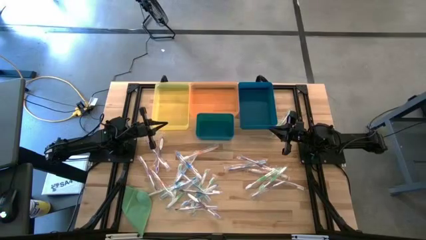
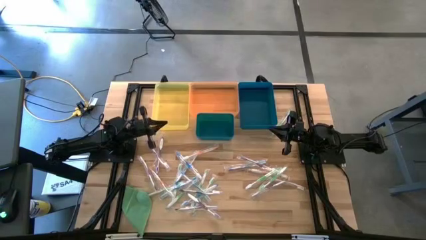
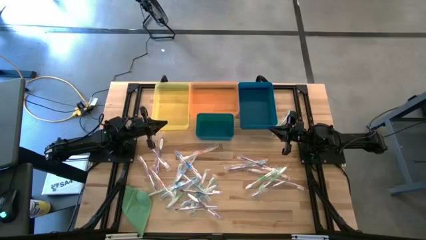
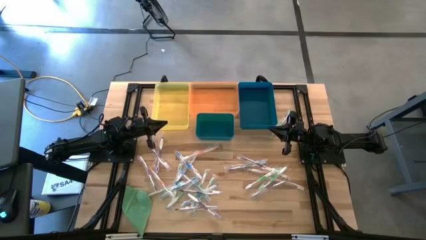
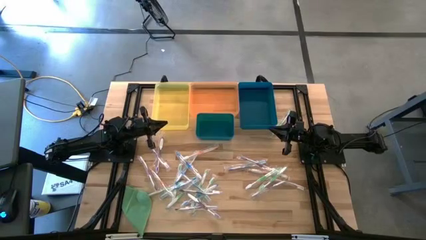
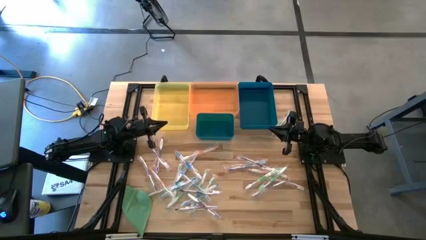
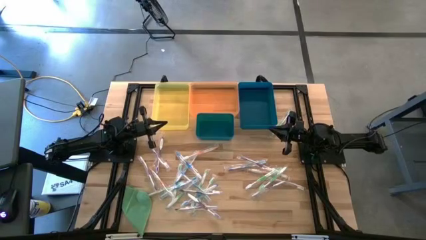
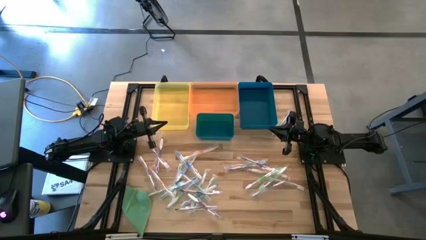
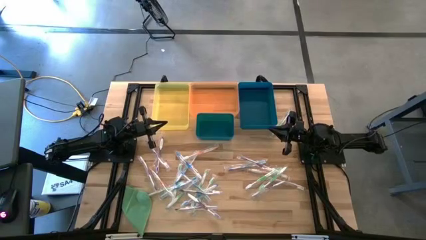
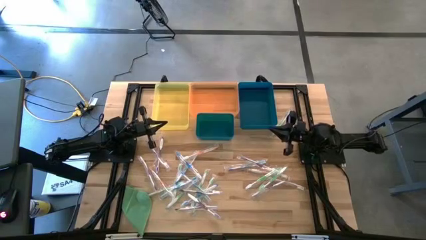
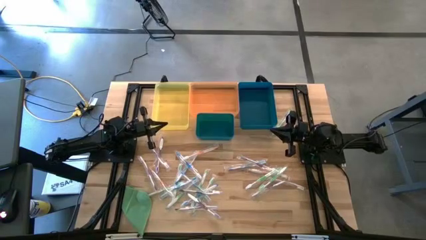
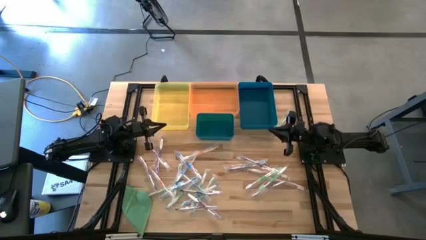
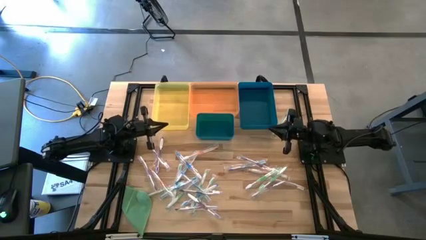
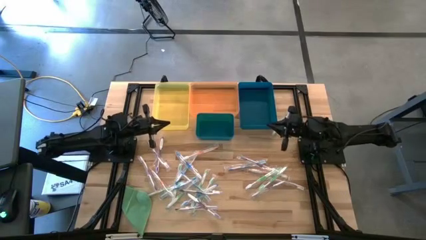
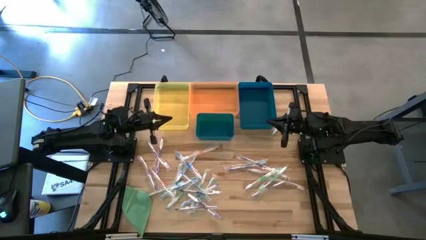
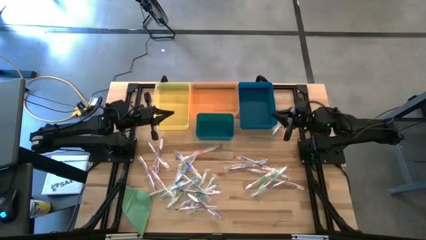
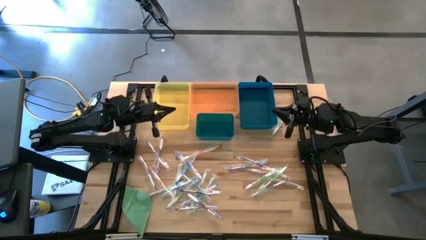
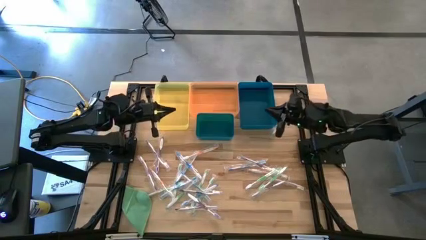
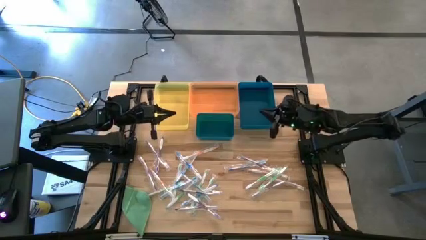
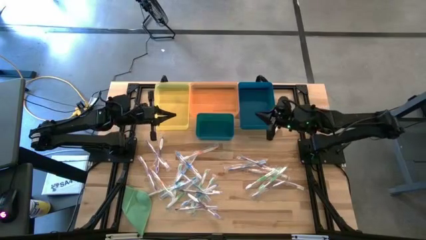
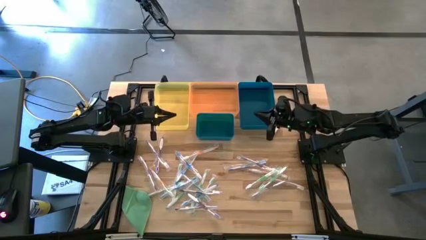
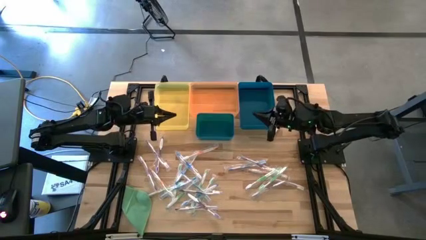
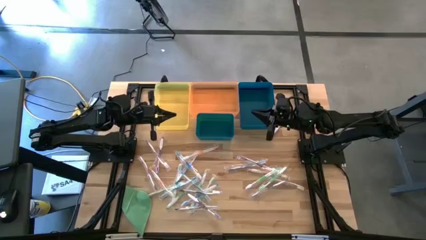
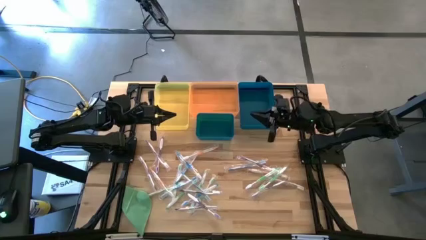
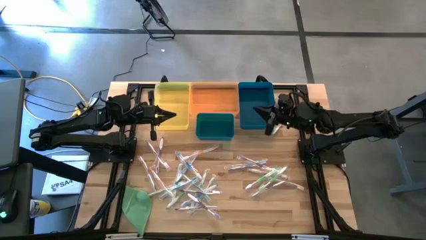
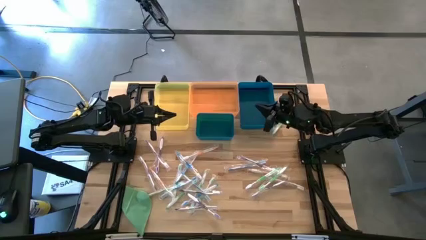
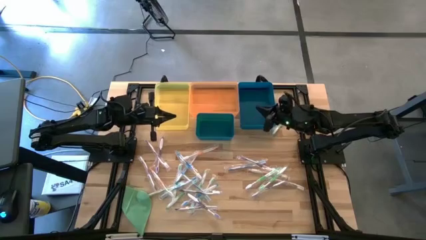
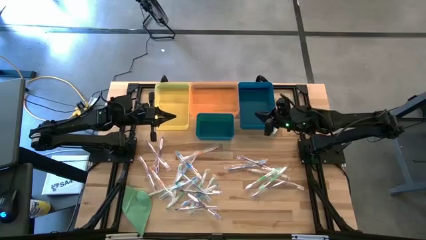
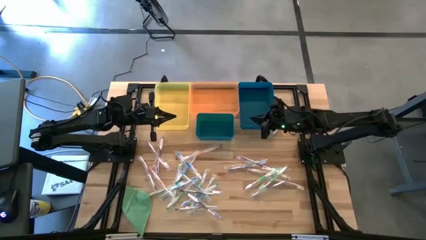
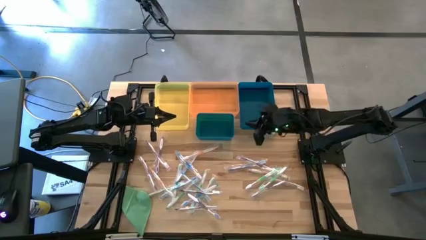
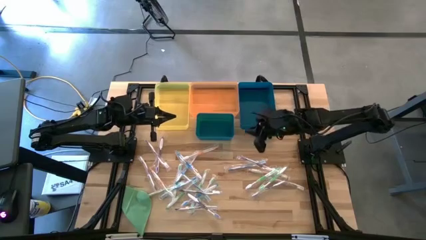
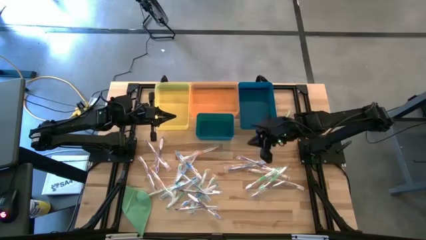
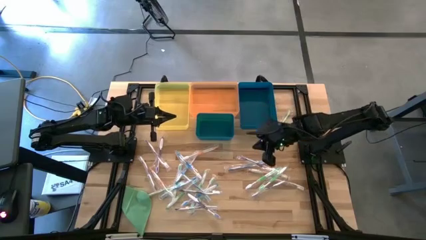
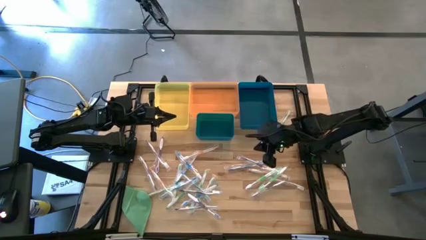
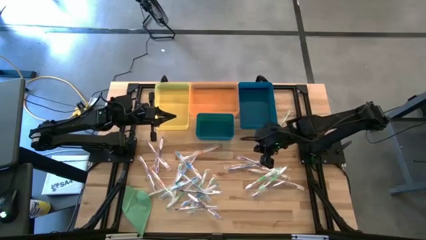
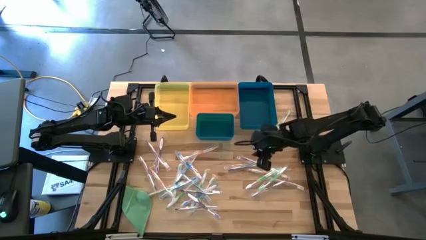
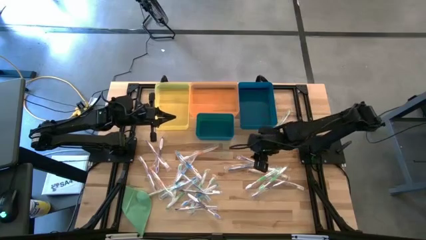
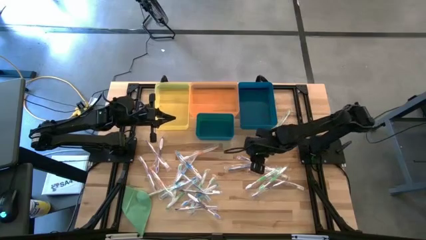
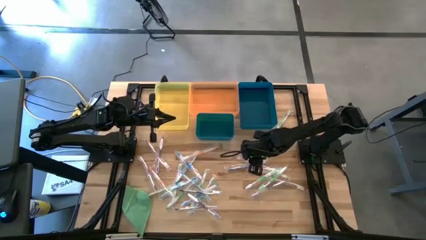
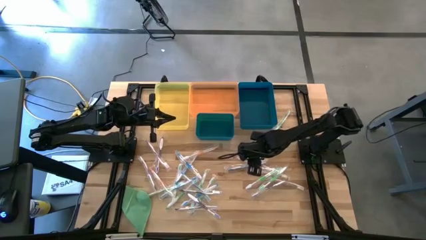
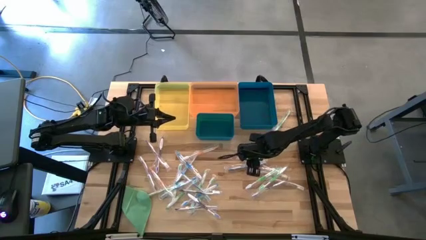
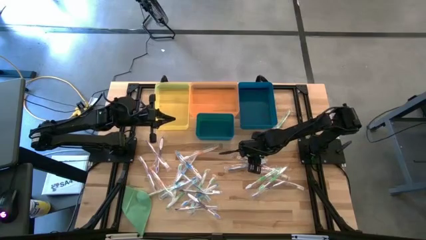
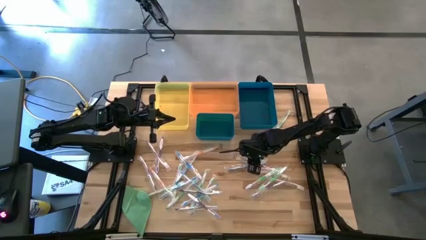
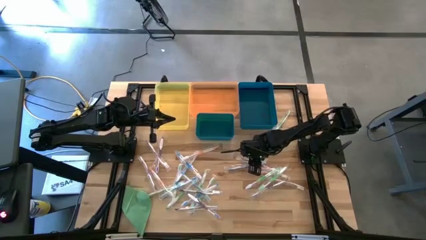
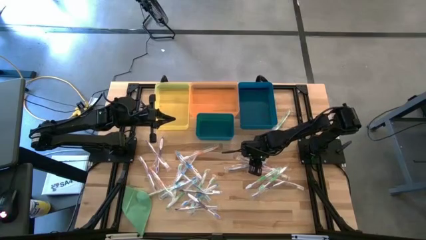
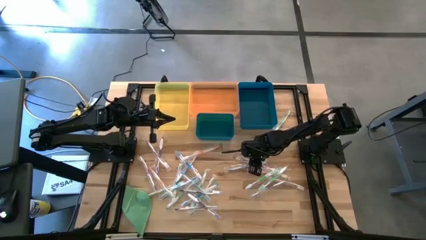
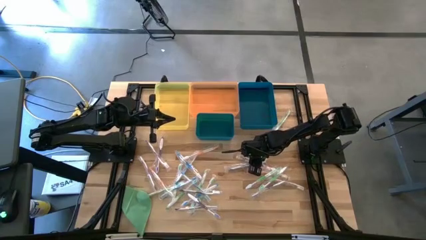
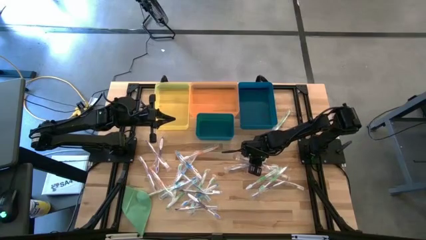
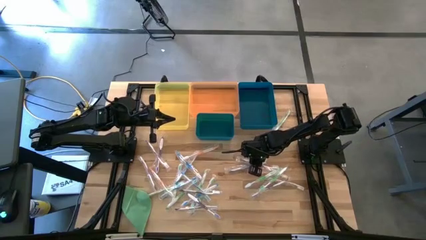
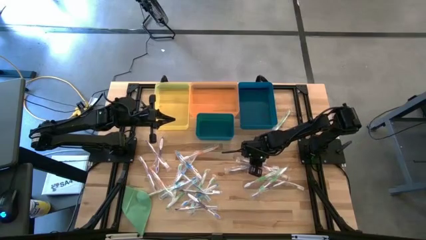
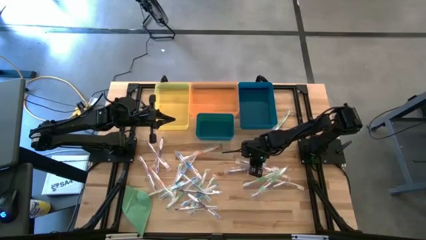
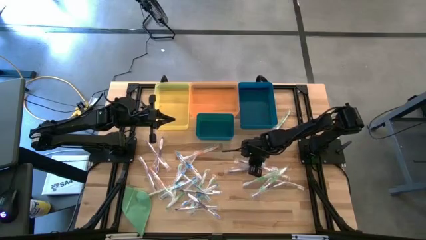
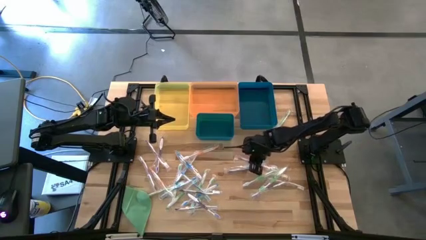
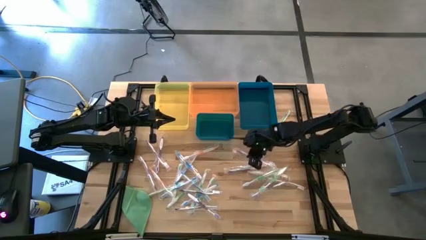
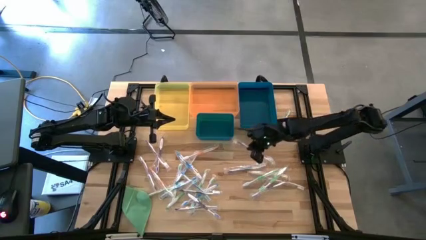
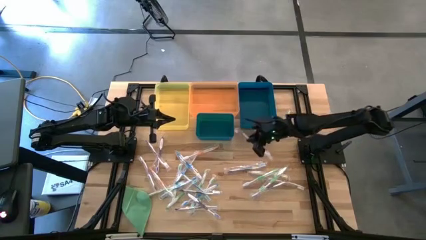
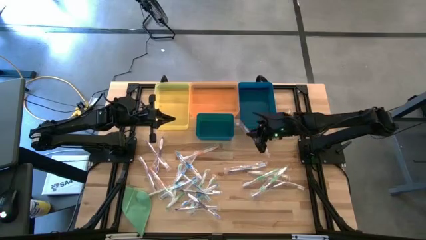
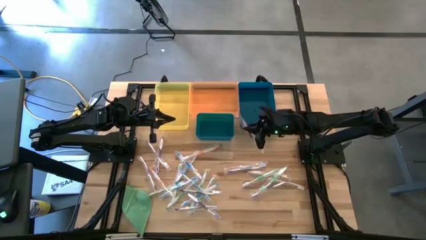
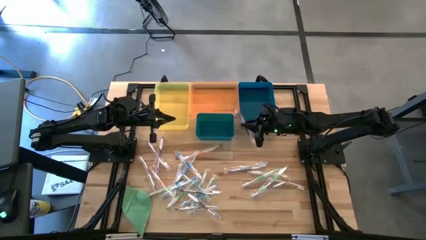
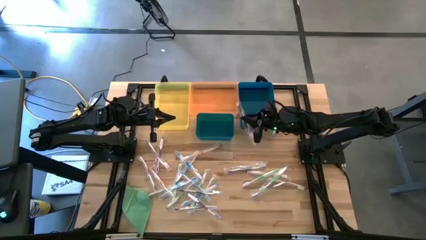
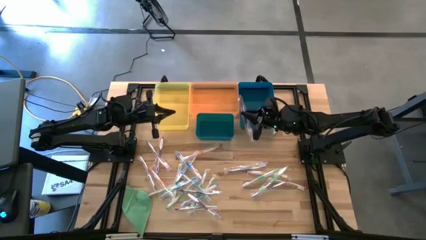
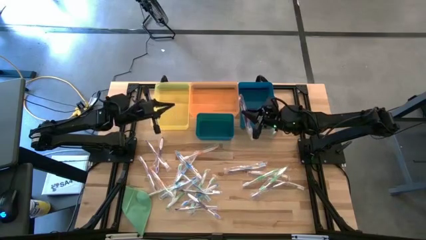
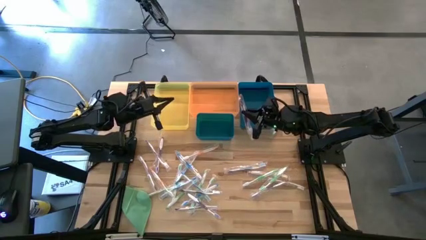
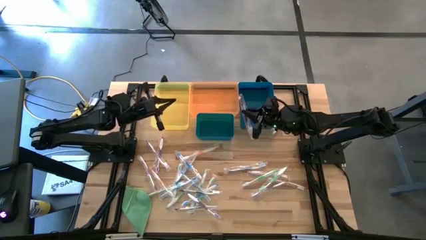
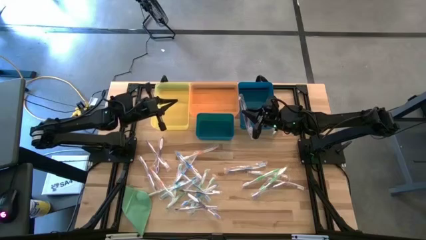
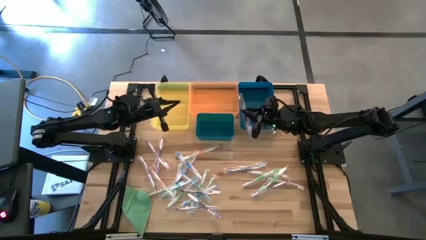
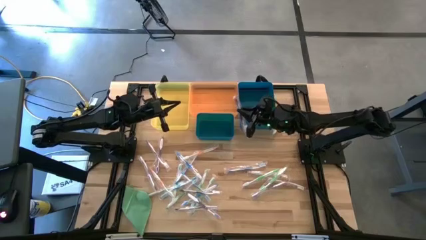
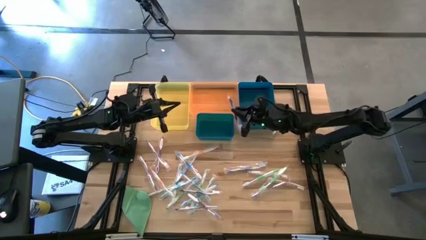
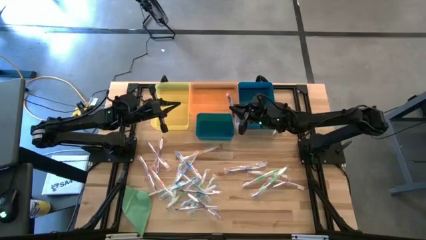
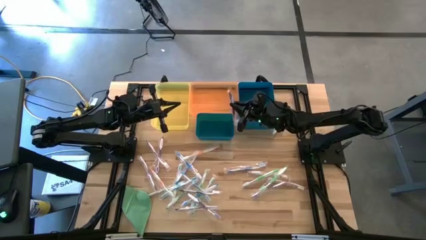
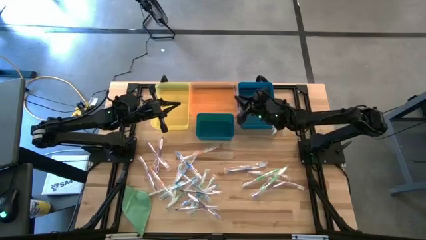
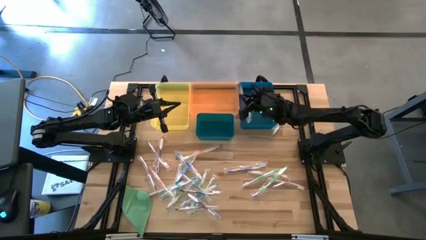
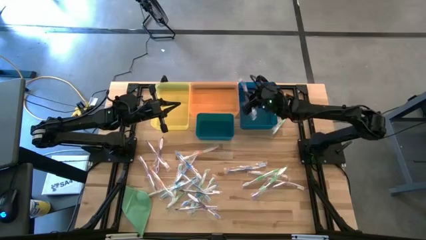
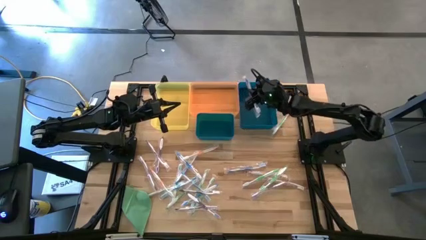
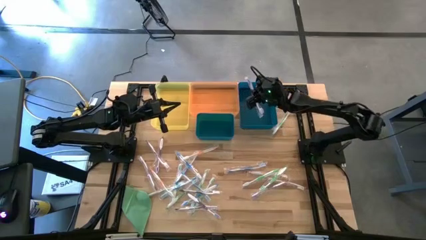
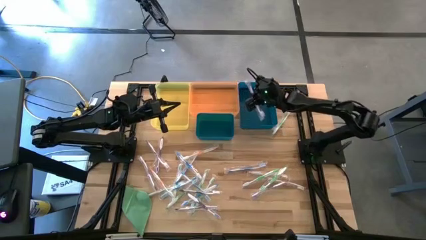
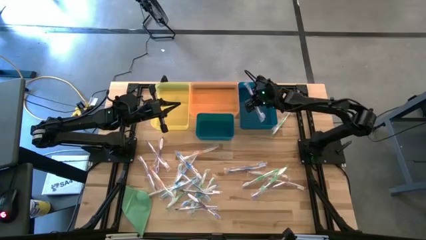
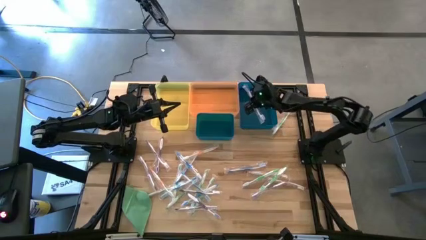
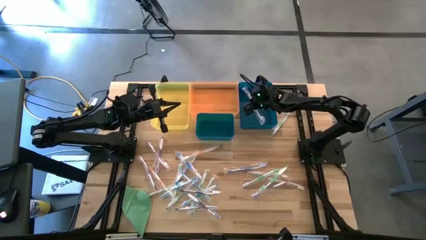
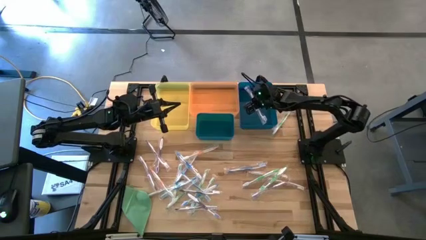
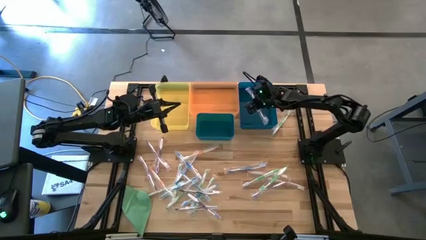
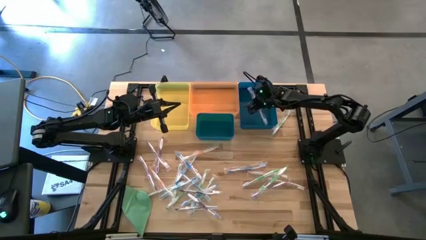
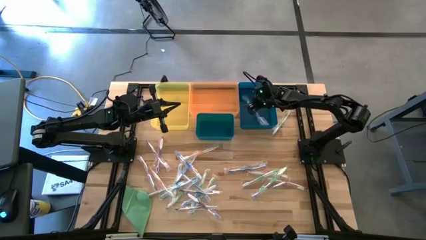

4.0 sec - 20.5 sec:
Task: Pick & Place Toothbrushes
Put the purple toothbrush into the blue bin
